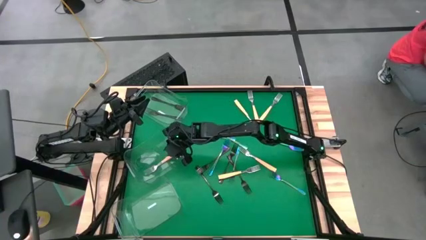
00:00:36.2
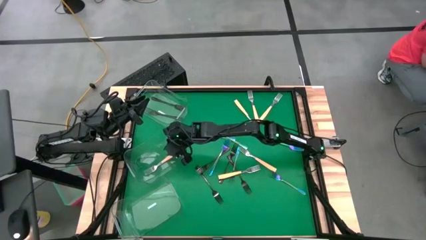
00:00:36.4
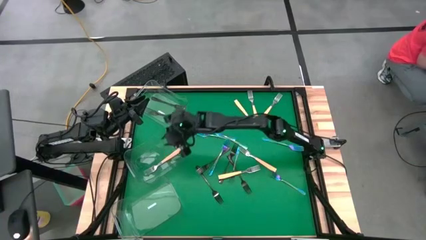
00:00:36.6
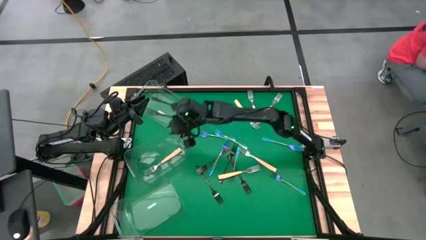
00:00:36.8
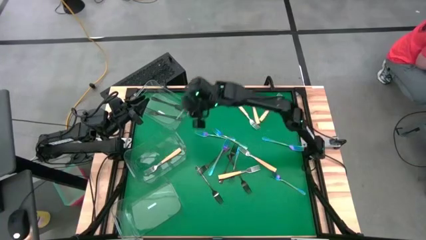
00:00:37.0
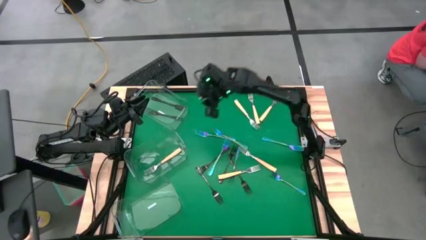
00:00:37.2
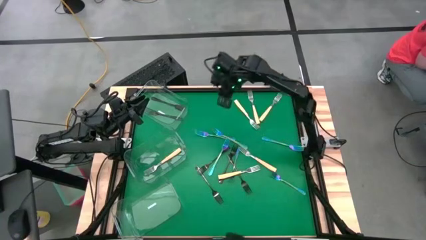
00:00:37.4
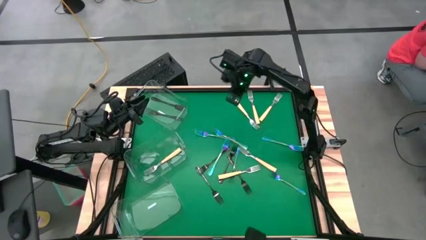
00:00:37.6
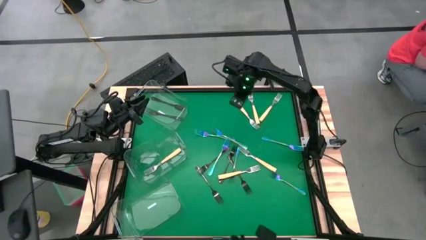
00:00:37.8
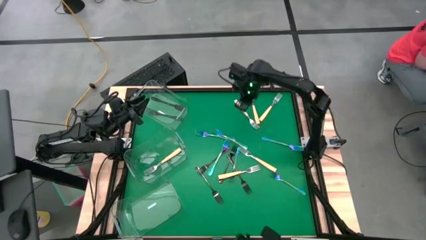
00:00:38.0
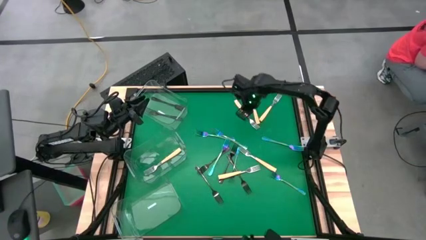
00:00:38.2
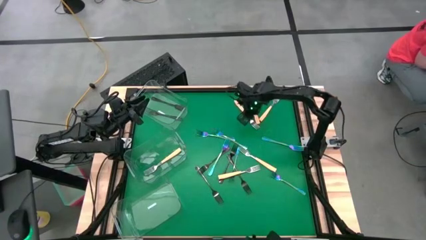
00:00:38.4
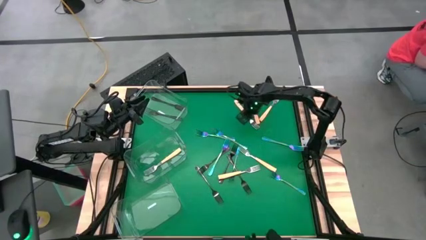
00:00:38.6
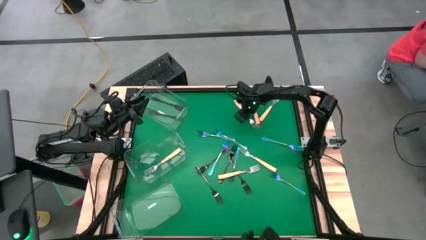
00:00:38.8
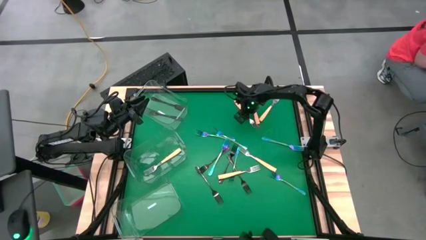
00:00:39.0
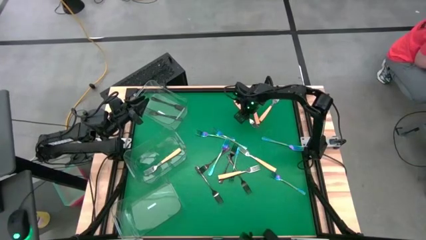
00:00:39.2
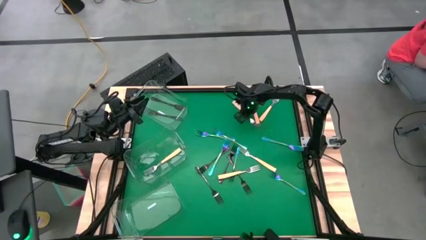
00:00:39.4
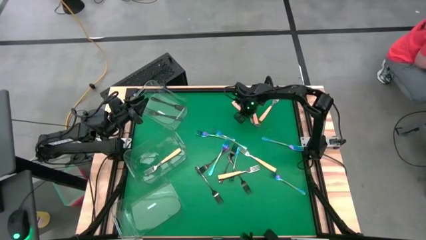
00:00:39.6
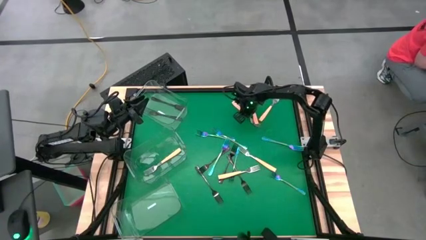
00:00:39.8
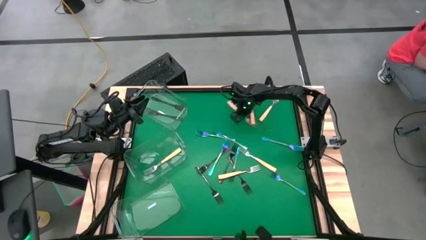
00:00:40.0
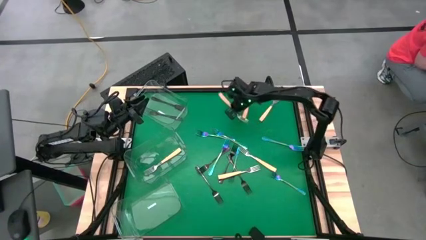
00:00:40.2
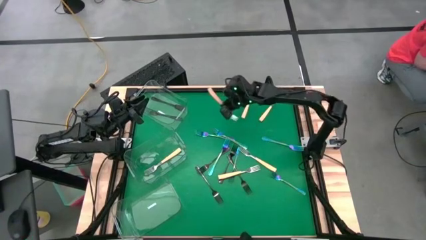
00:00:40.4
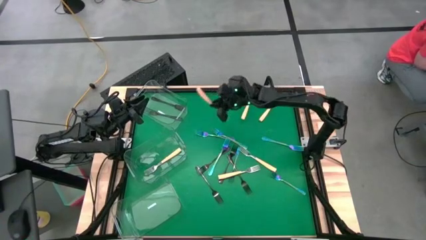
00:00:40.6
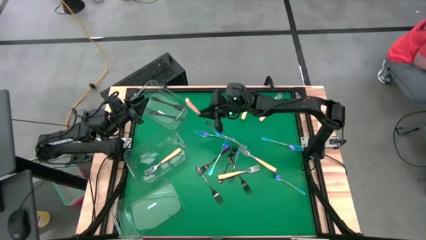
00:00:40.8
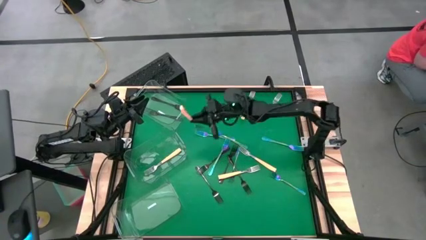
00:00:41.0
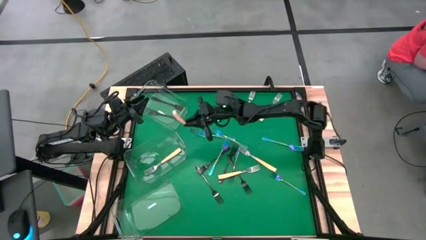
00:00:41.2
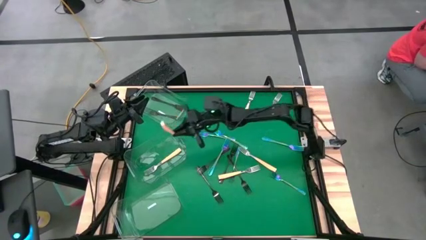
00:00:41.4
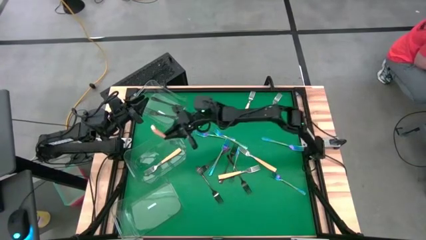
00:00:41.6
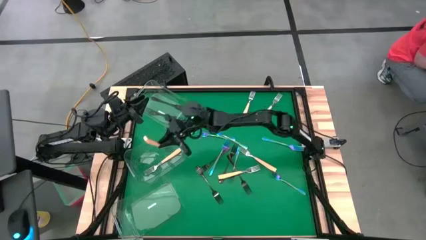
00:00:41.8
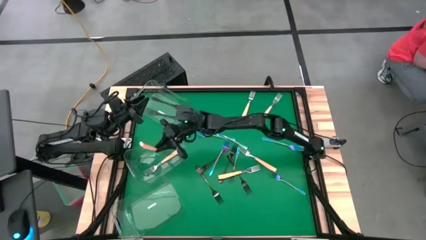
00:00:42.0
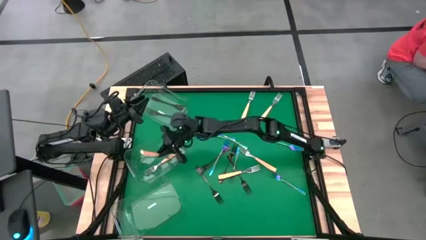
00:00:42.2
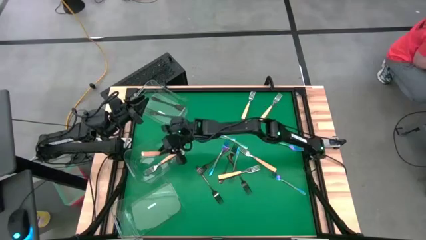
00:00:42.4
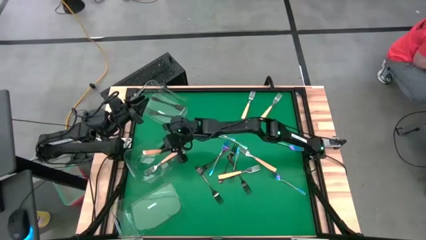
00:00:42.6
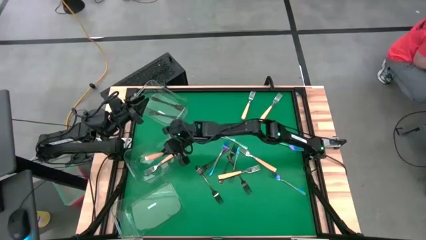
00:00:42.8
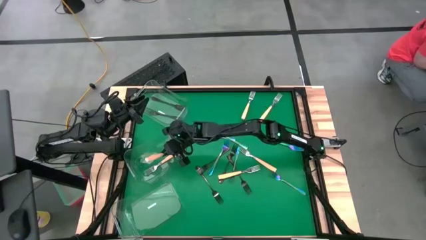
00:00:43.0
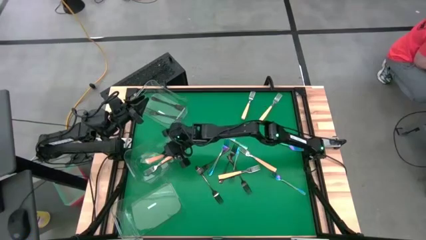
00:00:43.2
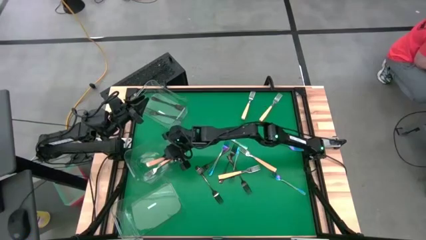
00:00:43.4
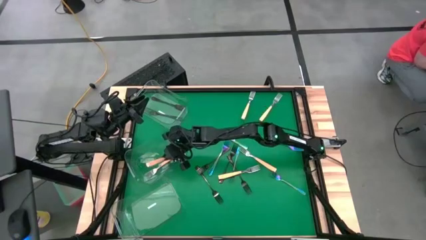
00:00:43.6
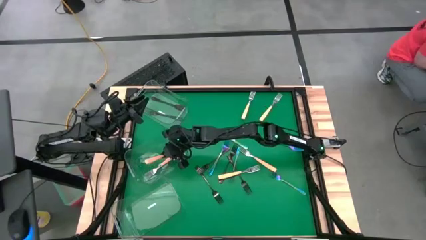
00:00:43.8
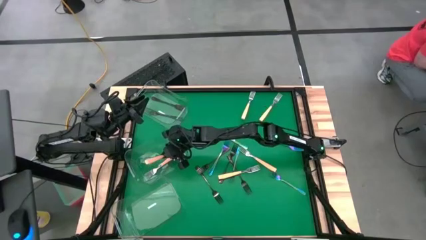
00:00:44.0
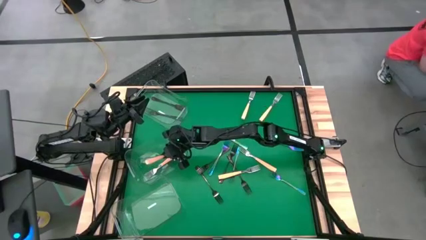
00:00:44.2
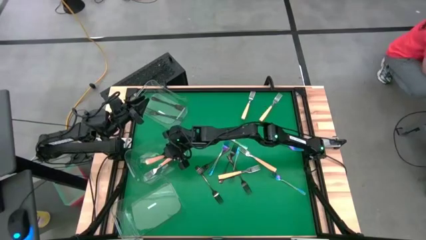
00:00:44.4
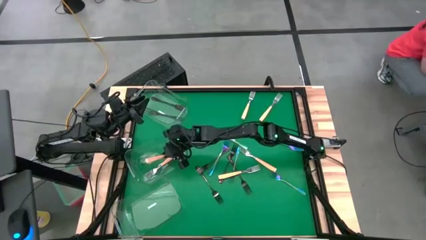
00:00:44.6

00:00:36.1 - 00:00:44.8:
Task: Sort silverware by color (type)
Put the orange fork into the middle transparent bin

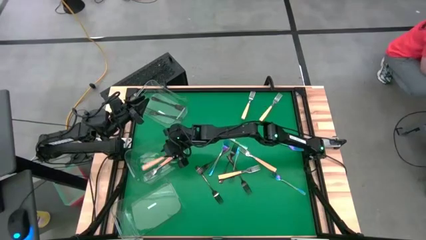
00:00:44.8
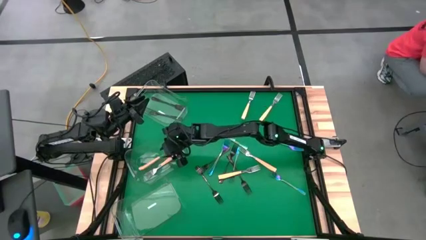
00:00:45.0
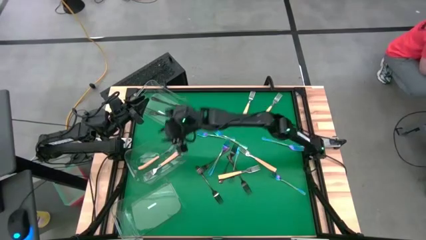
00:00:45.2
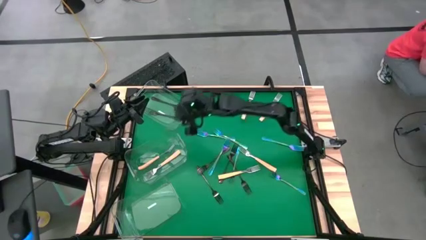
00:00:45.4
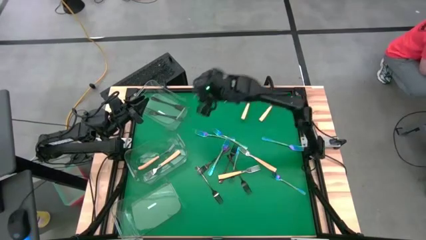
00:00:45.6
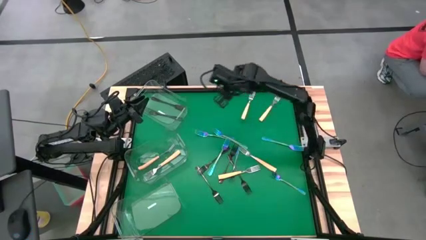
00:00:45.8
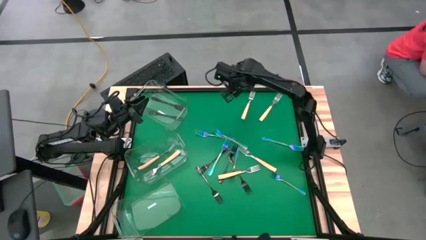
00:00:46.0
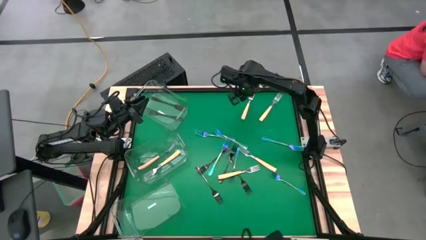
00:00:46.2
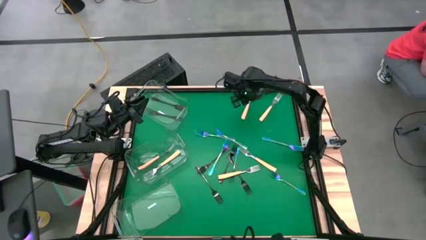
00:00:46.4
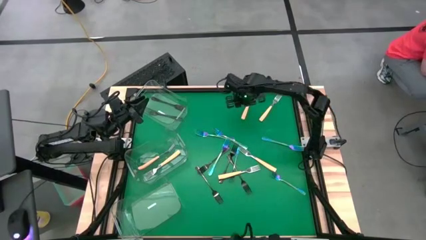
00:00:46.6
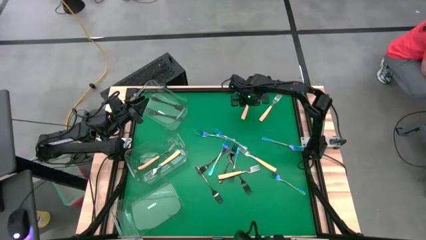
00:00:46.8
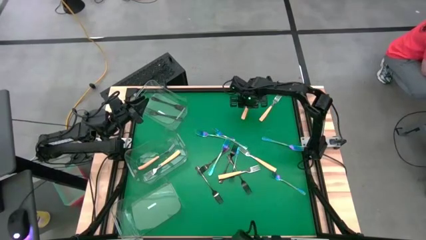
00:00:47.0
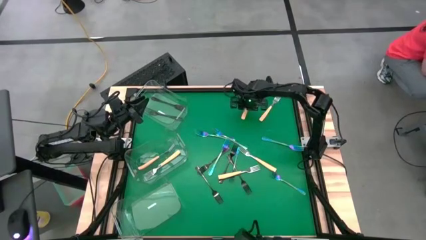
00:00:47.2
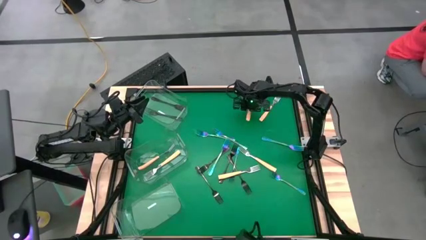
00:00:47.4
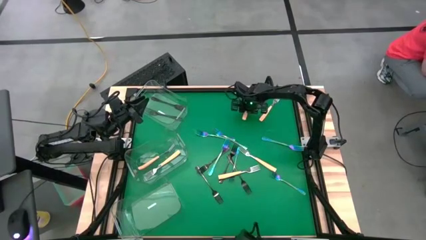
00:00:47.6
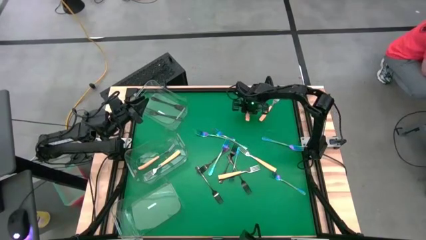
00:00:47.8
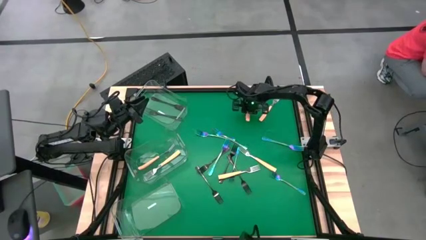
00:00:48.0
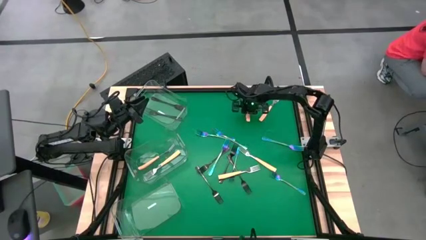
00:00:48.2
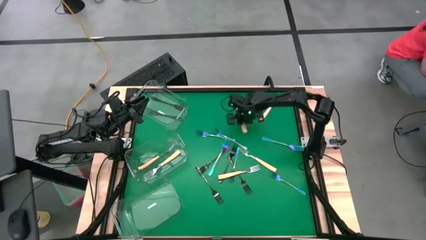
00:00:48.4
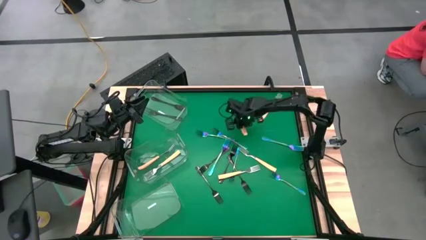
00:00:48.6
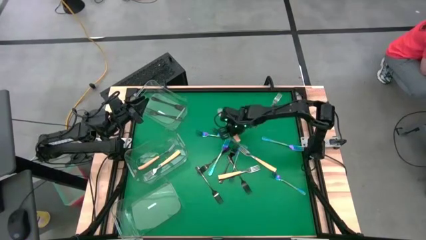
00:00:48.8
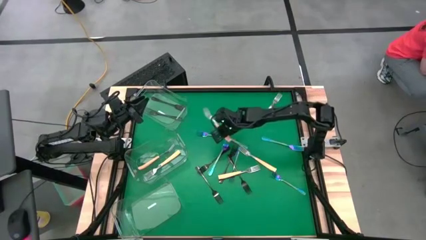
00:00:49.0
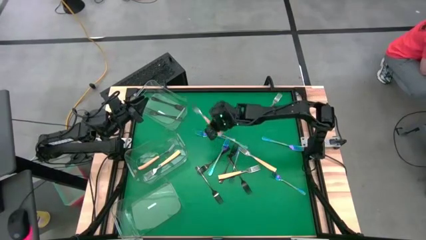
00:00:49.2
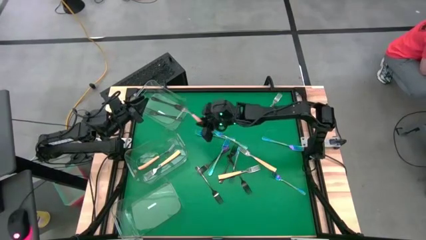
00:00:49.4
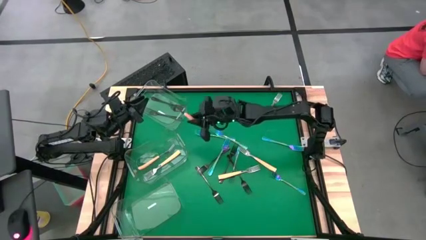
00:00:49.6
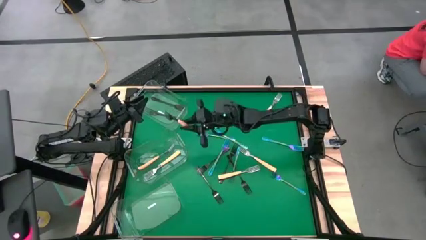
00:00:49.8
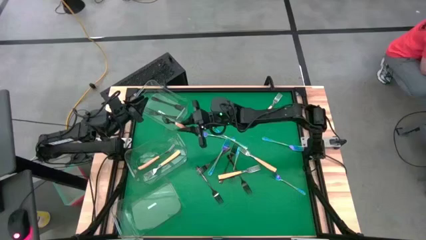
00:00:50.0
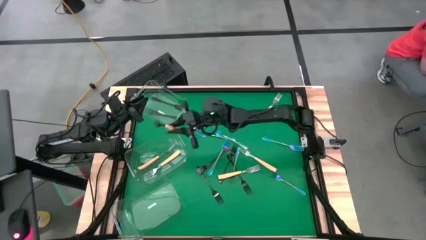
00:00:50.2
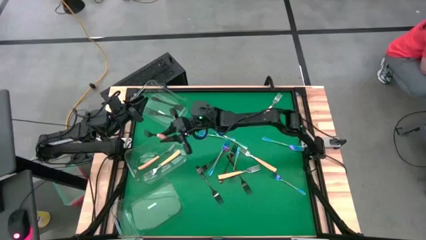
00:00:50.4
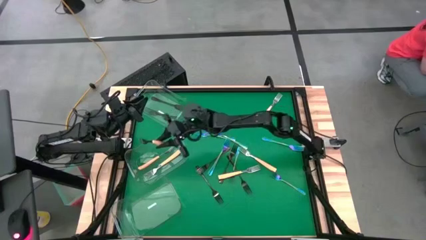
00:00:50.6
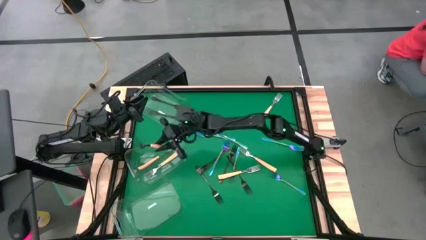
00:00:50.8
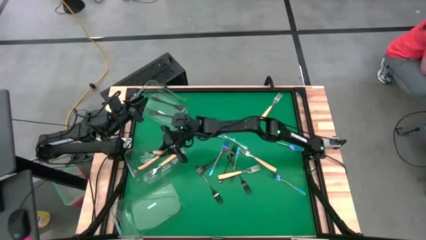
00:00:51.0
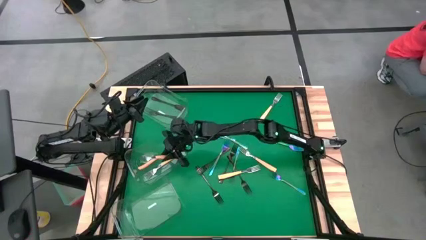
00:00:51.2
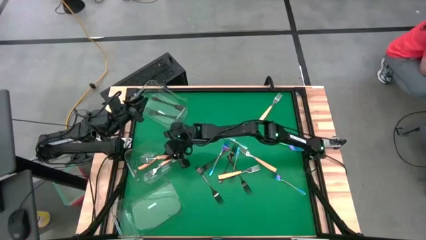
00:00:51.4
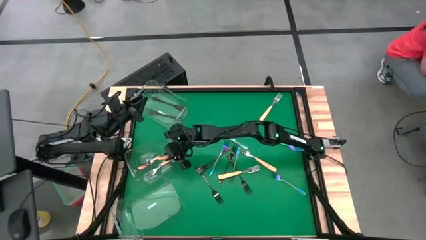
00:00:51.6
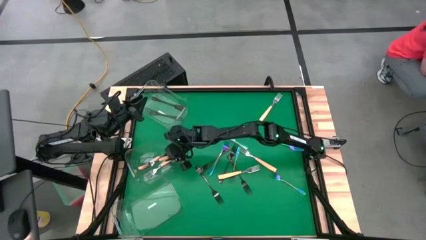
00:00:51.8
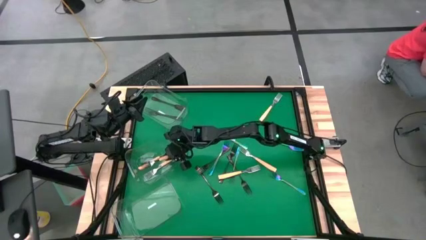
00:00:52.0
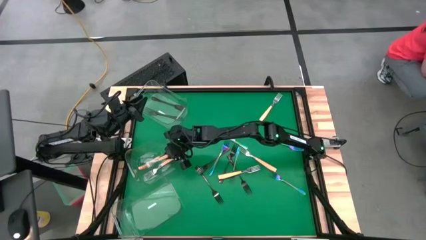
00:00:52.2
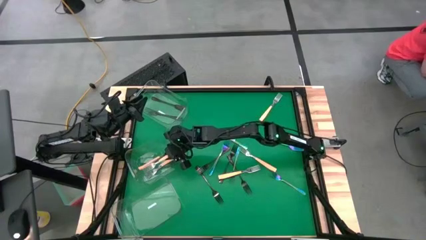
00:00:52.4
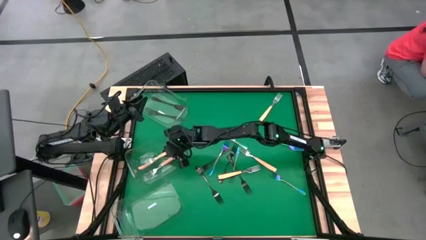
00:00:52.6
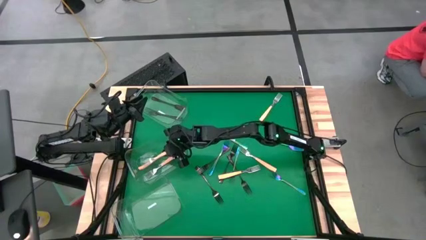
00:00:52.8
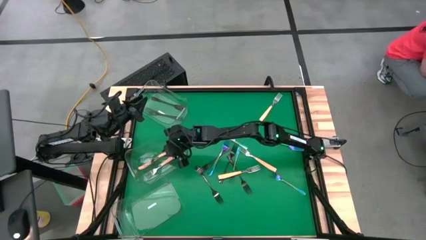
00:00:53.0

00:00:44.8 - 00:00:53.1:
Put the orange fork into the middle transparent bin
